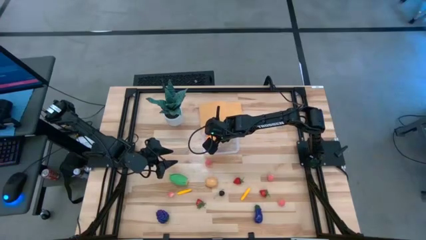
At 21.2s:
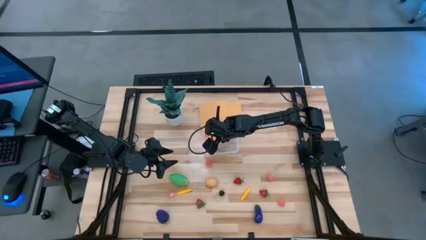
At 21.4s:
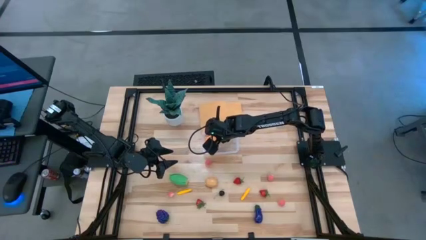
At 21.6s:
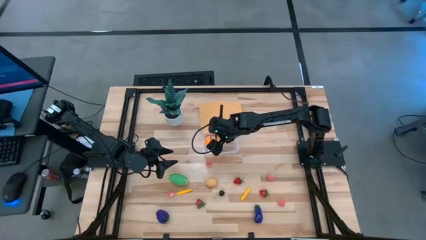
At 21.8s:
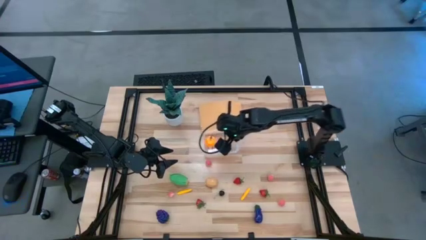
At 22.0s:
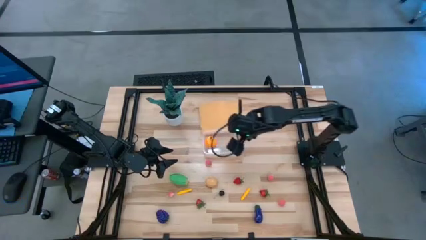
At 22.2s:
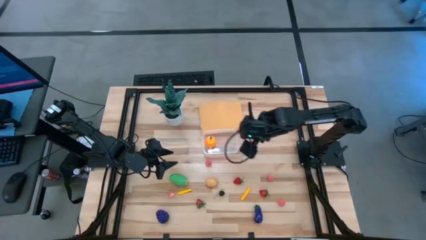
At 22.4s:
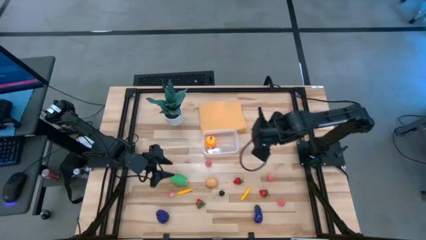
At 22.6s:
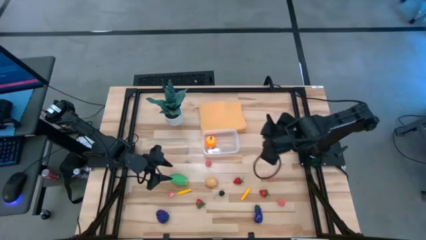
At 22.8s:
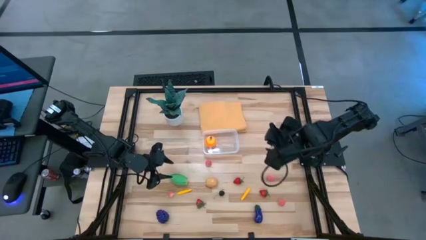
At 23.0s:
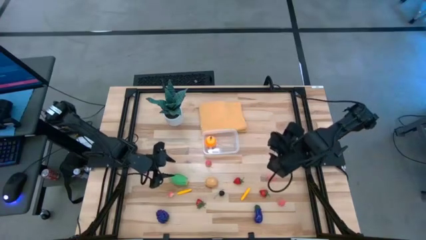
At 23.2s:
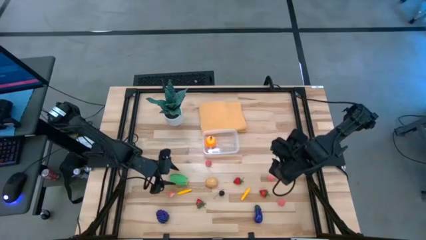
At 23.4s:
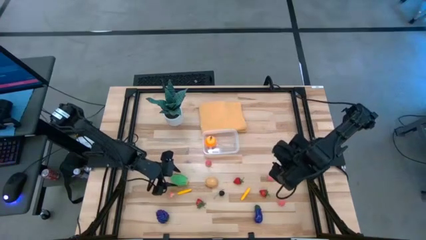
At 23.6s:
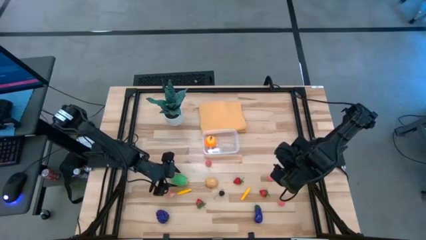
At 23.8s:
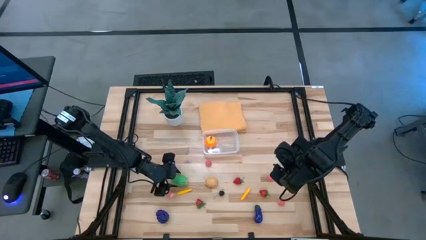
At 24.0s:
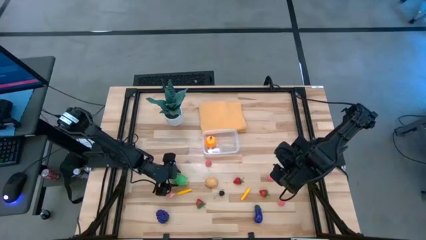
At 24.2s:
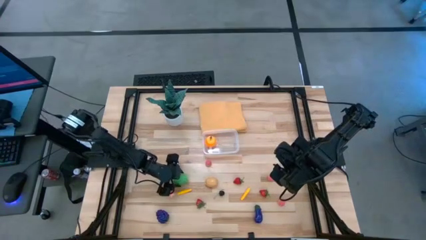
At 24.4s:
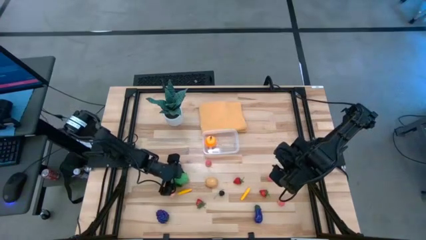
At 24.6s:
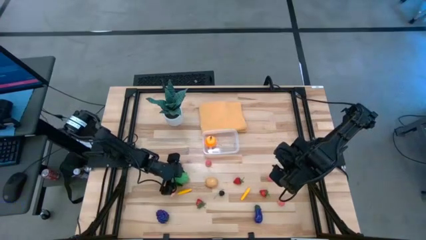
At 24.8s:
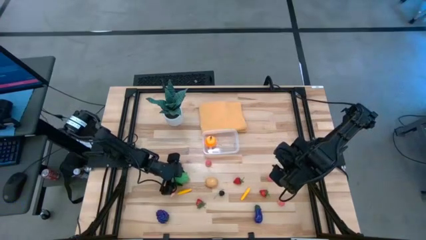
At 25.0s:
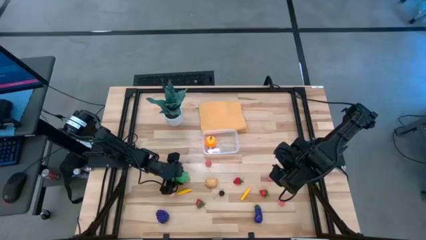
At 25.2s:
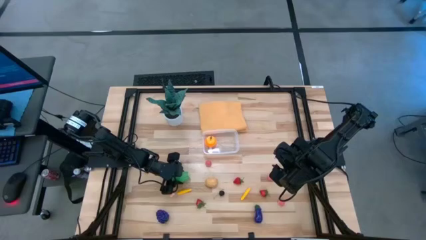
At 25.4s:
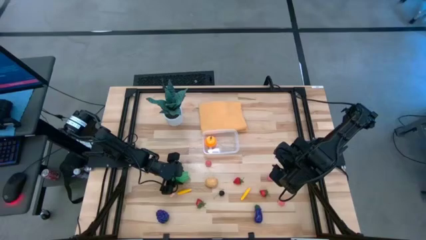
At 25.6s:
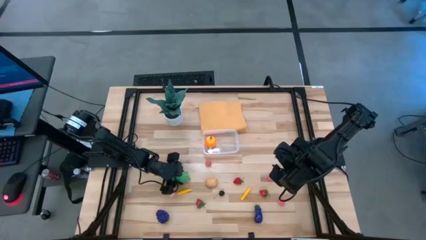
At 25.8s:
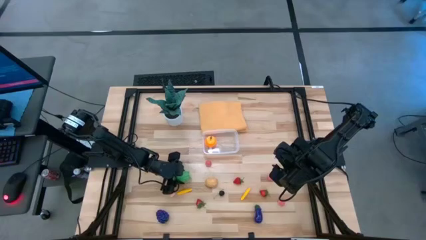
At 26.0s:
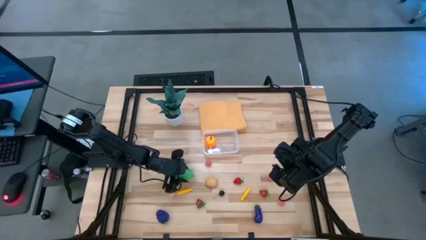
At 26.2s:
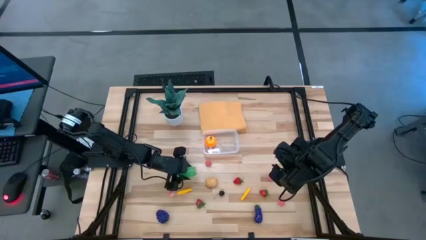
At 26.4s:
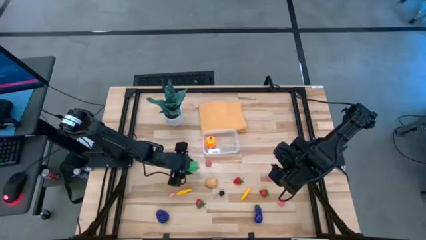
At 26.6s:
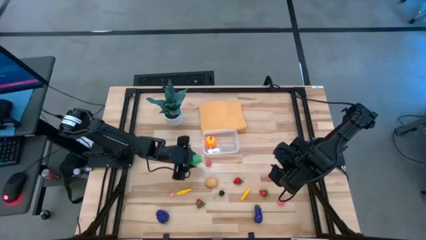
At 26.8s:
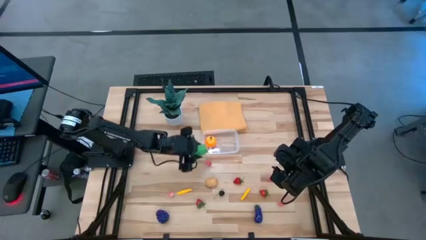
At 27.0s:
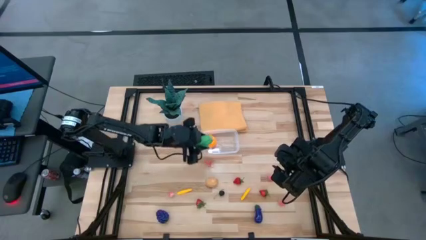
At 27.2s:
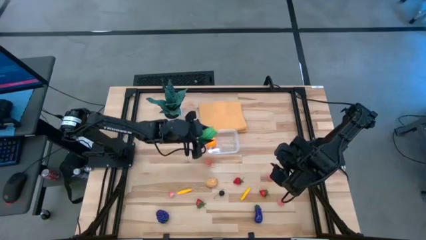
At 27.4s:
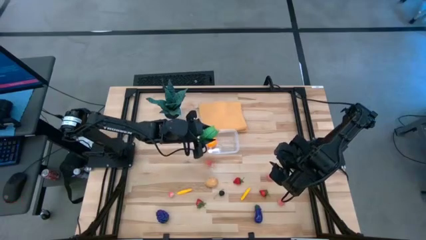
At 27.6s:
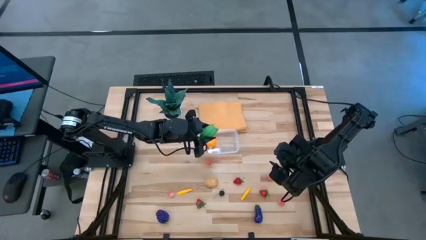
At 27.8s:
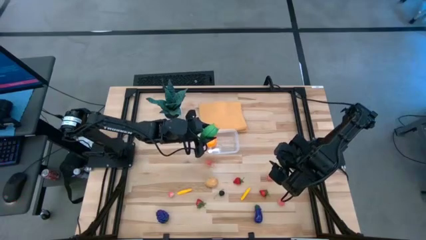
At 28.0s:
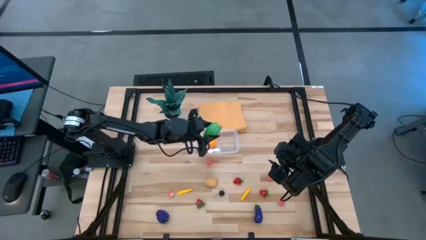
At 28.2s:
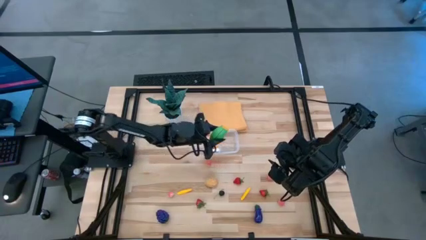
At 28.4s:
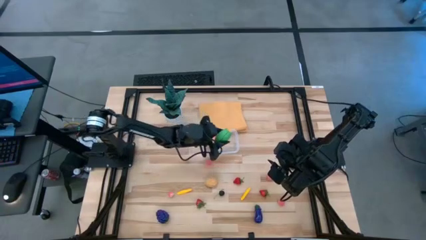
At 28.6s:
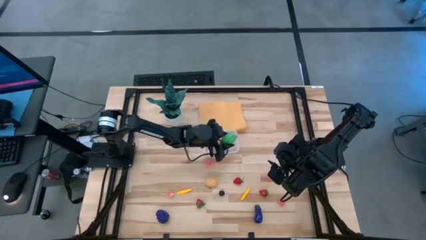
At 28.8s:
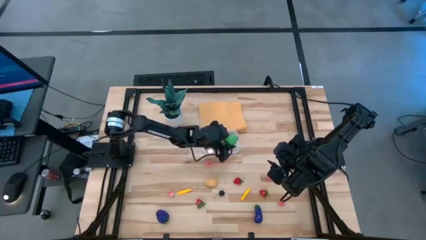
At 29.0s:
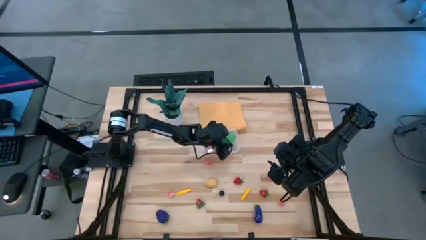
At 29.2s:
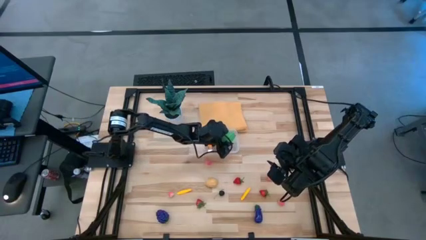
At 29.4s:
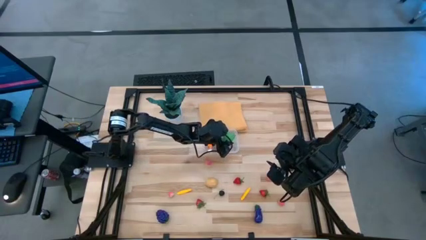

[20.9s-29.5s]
Task: Pick and placing Produce into tupperware
Put the green corn into the transparent bin

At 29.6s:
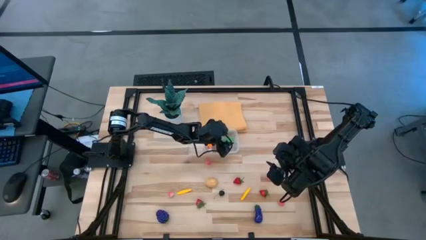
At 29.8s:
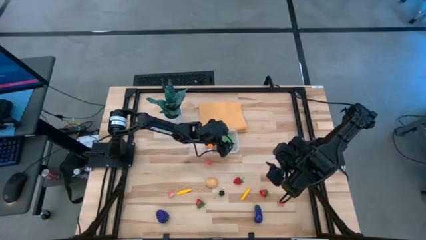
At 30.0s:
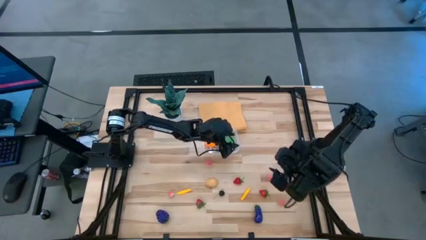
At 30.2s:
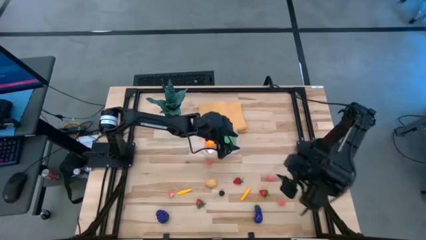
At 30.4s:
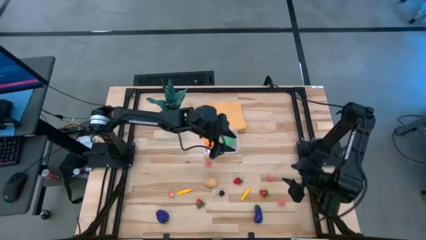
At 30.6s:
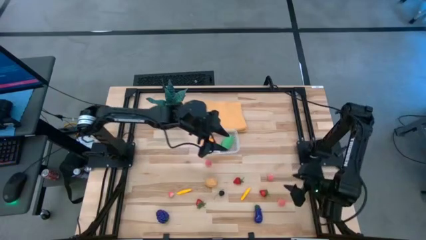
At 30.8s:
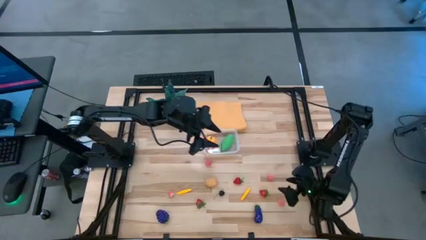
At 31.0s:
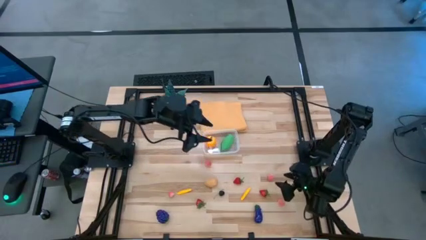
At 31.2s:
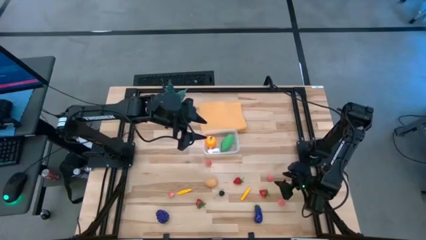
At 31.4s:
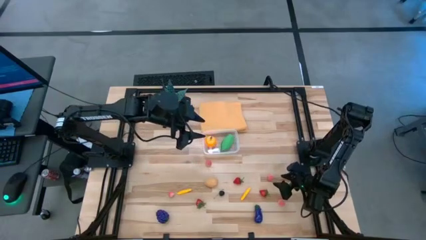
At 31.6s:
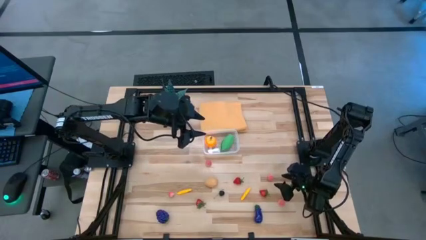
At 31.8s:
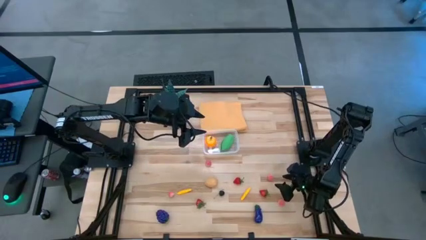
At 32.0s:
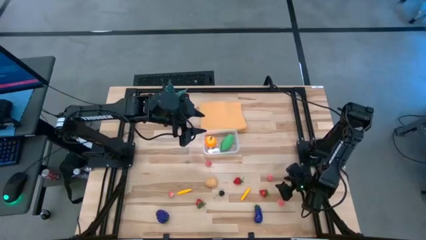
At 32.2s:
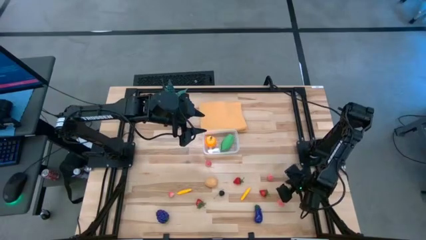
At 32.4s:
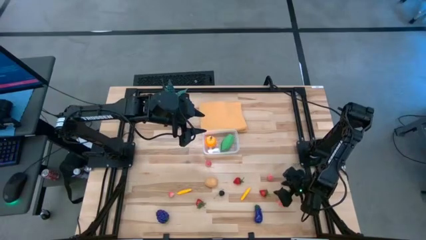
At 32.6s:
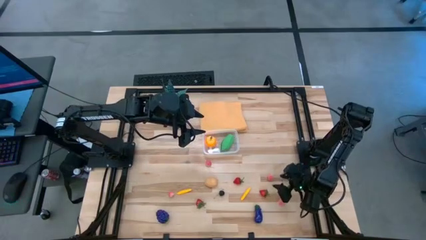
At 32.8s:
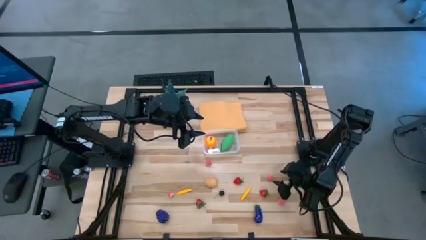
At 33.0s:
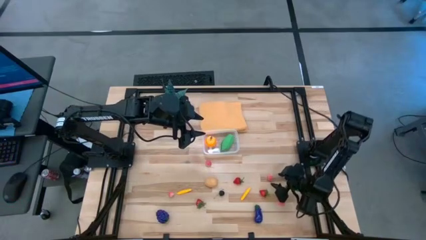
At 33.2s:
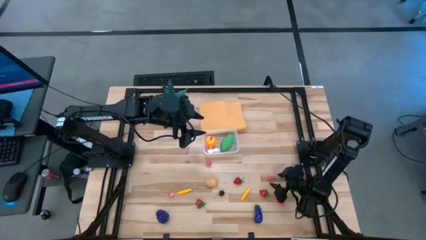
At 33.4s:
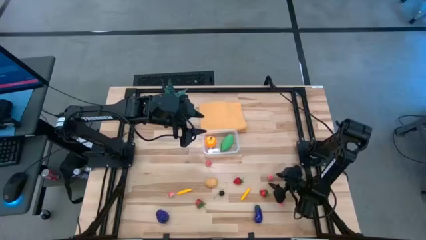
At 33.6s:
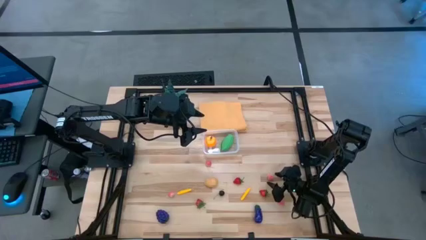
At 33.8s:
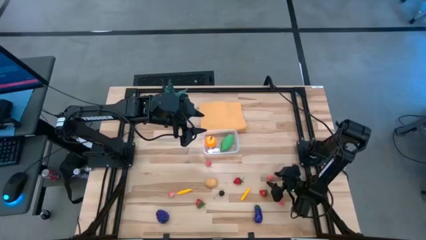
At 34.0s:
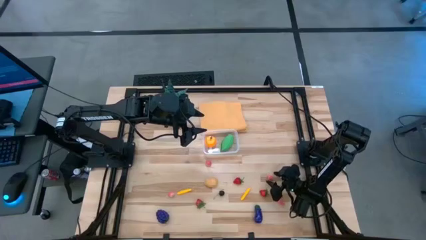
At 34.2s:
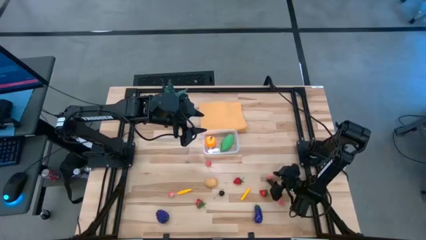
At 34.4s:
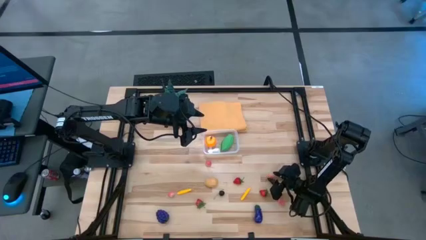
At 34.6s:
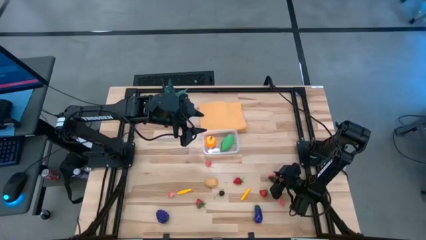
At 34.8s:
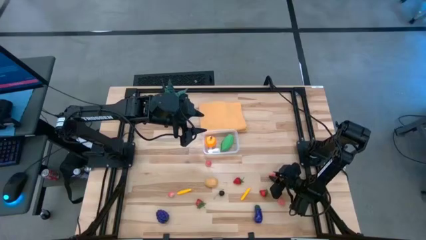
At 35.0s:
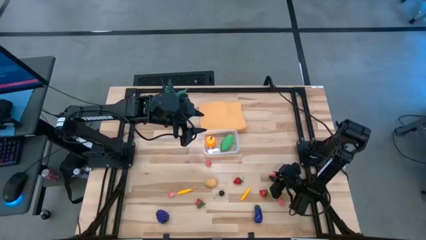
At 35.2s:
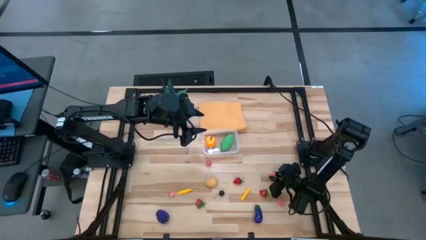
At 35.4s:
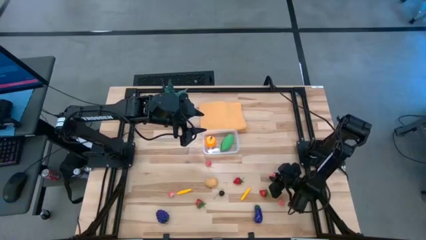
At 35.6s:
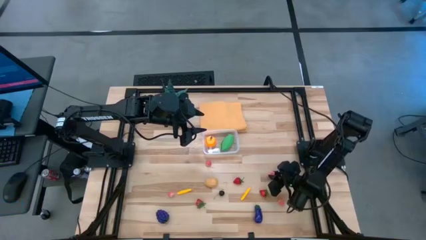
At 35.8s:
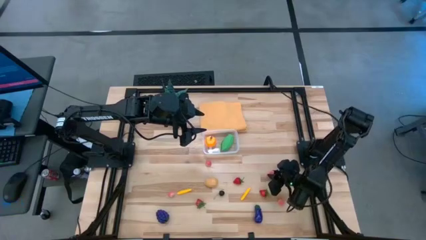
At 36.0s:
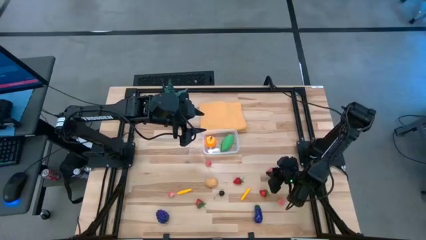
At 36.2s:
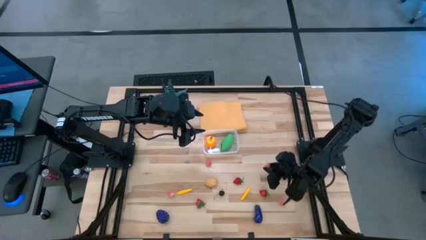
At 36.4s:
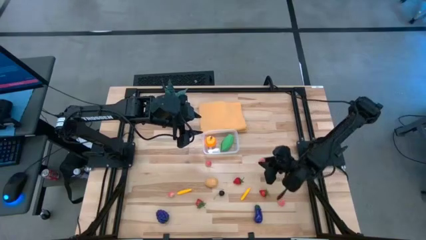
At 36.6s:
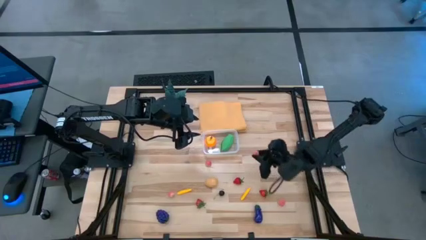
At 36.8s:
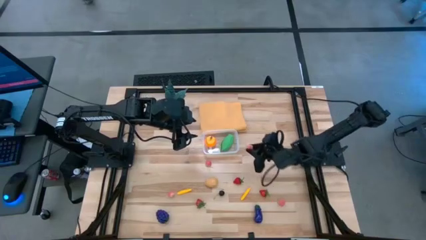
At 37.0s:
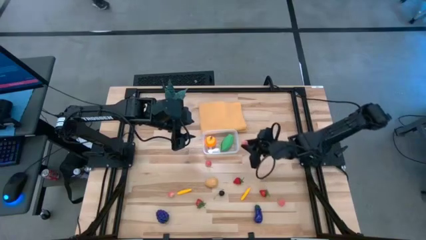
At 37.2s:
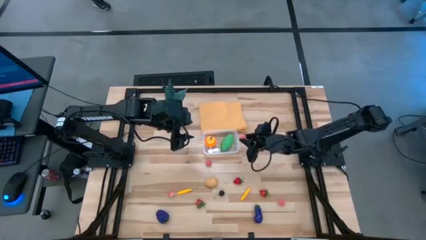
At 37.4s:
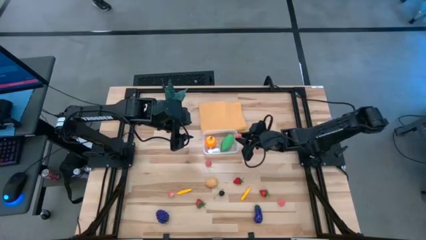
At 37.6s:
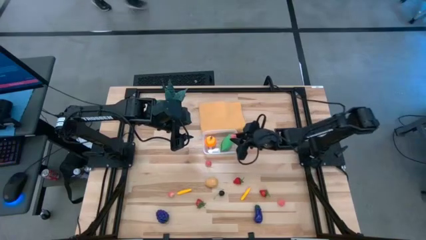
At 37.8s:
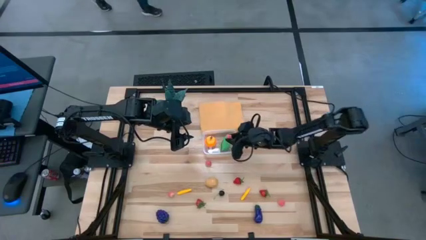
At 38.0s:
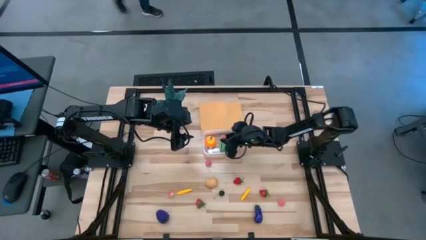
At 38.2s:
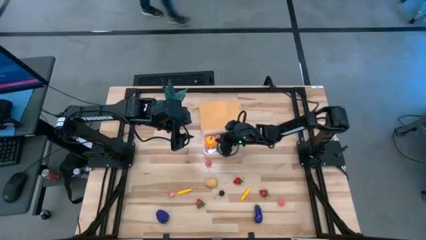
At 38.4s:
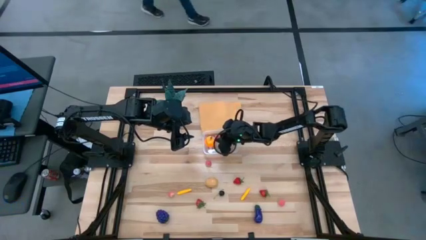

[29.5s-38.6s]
Put the pink apricot into the transparent bin
